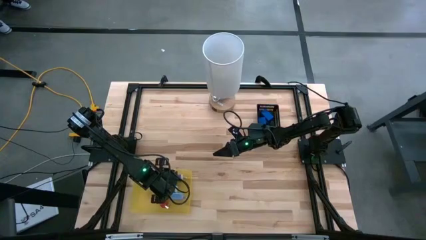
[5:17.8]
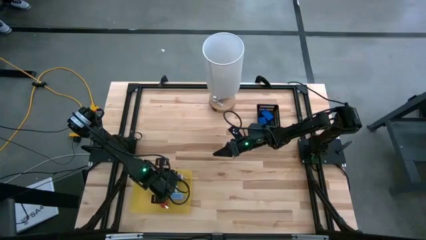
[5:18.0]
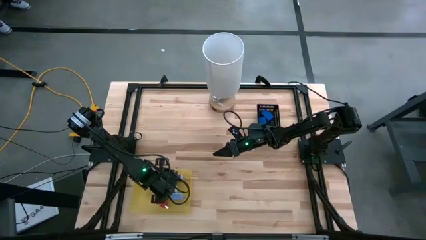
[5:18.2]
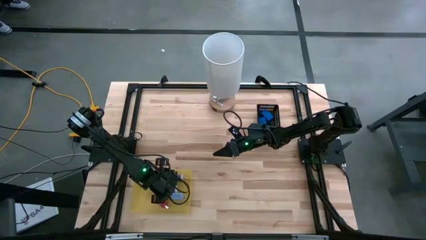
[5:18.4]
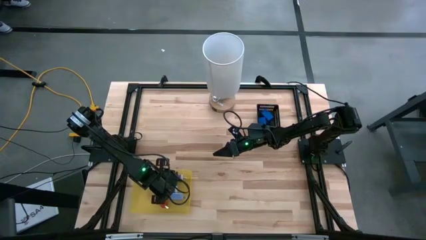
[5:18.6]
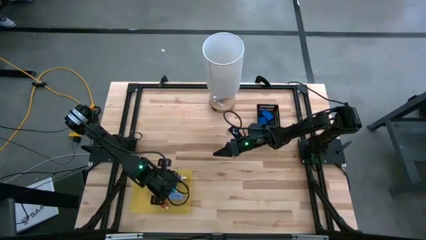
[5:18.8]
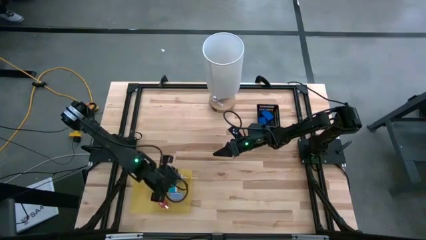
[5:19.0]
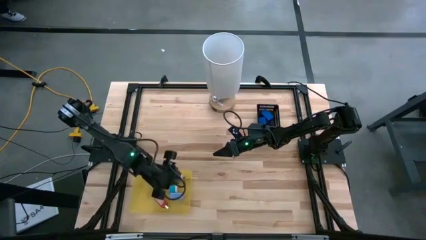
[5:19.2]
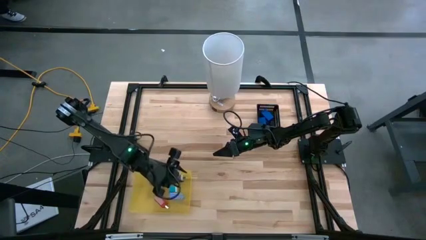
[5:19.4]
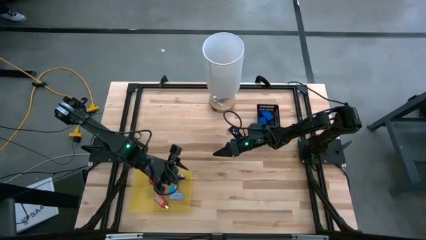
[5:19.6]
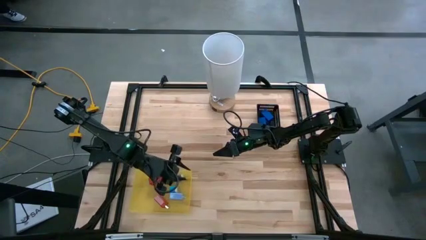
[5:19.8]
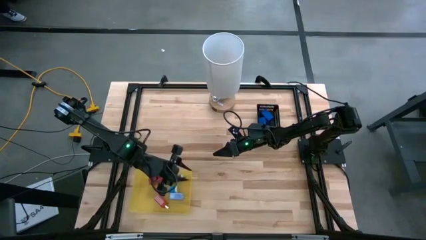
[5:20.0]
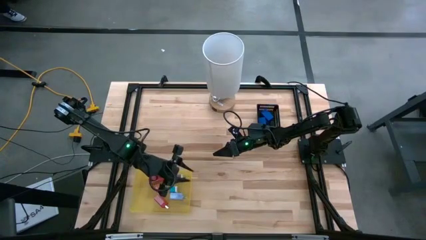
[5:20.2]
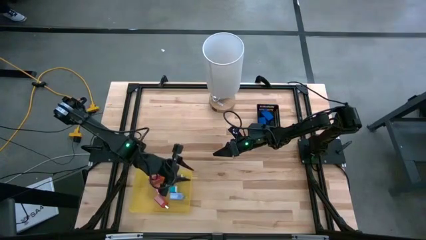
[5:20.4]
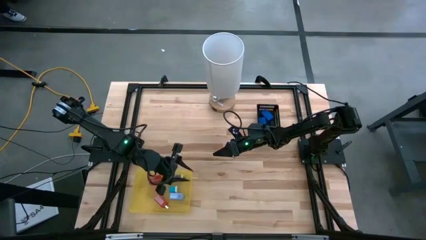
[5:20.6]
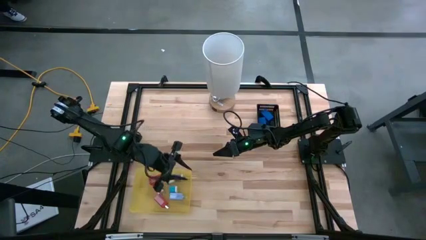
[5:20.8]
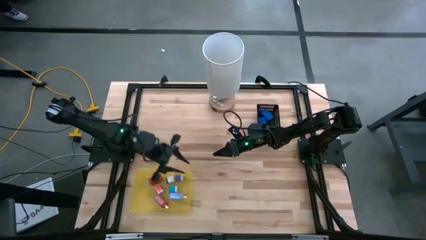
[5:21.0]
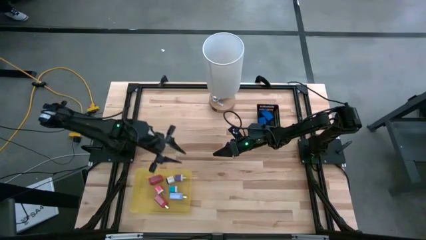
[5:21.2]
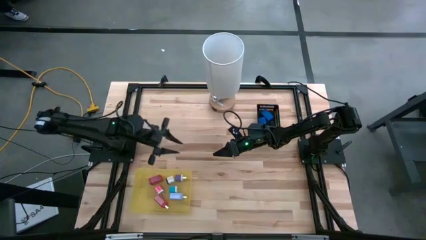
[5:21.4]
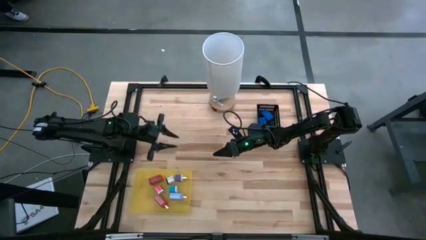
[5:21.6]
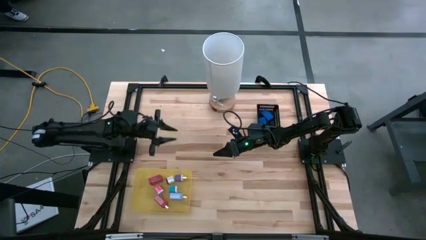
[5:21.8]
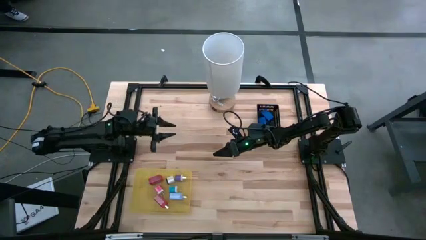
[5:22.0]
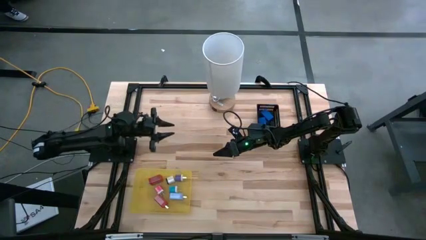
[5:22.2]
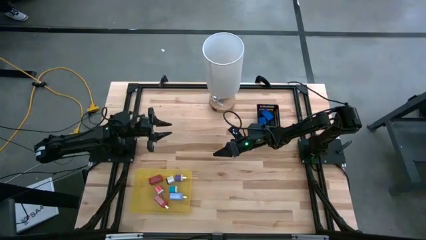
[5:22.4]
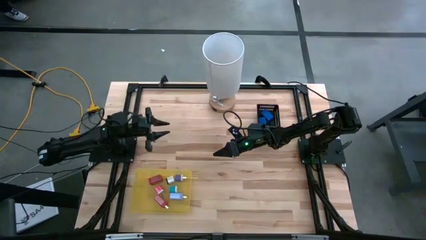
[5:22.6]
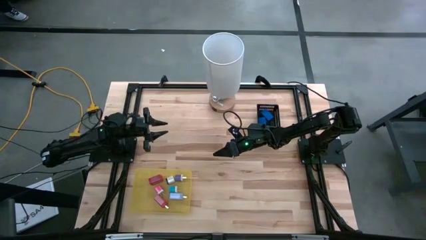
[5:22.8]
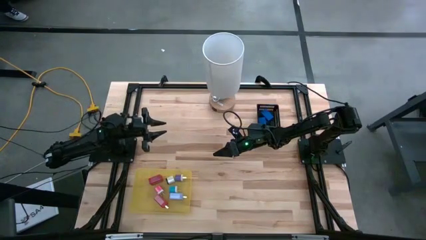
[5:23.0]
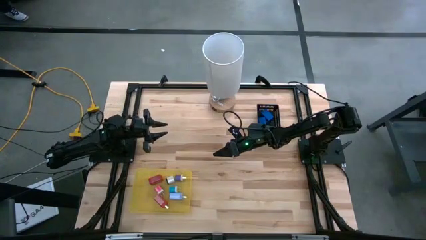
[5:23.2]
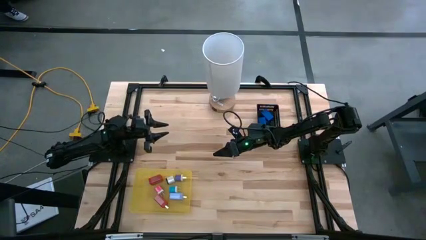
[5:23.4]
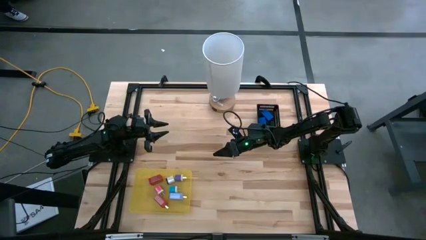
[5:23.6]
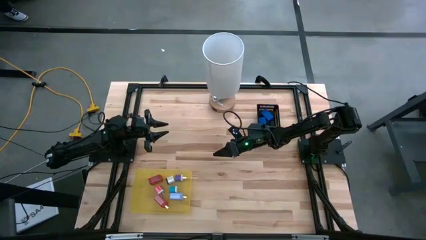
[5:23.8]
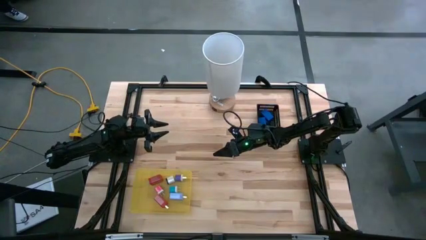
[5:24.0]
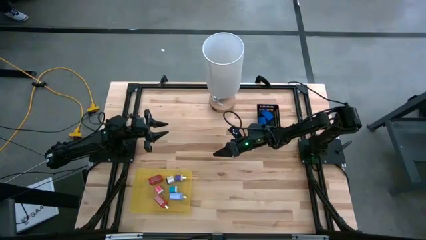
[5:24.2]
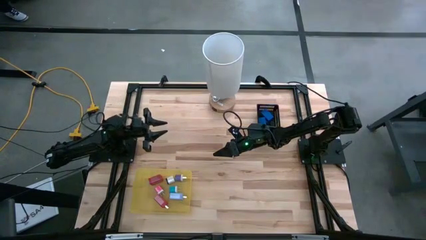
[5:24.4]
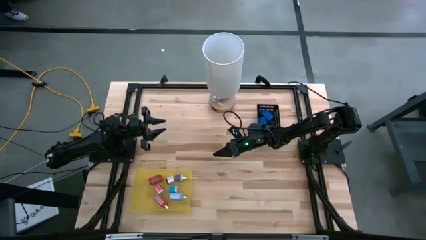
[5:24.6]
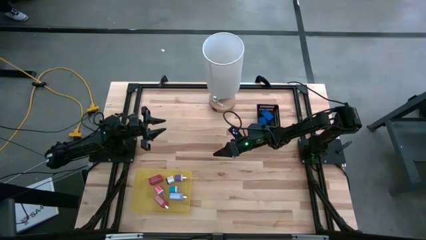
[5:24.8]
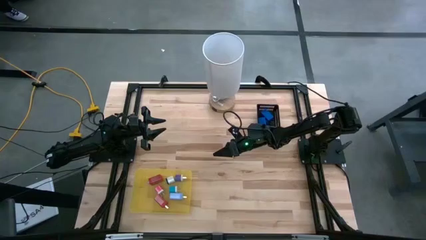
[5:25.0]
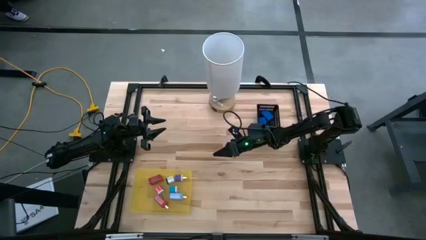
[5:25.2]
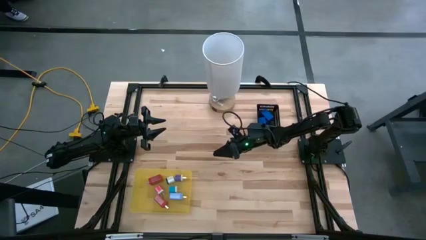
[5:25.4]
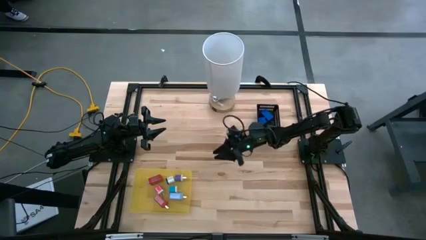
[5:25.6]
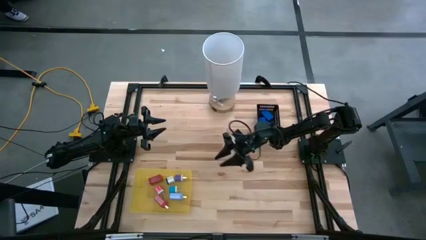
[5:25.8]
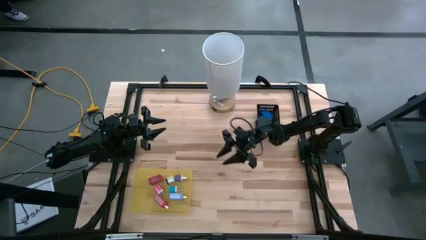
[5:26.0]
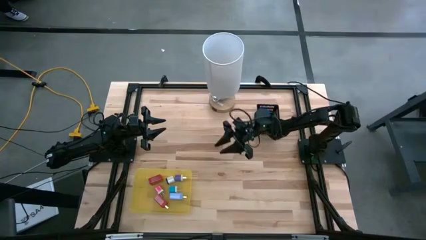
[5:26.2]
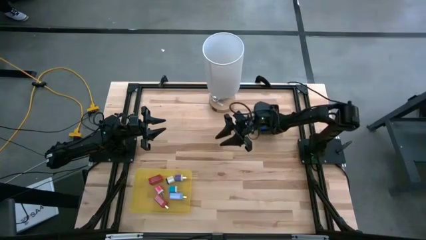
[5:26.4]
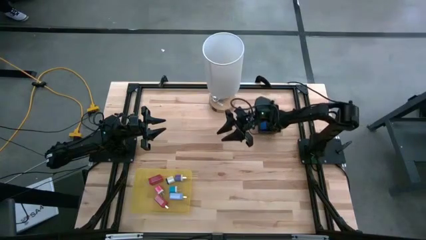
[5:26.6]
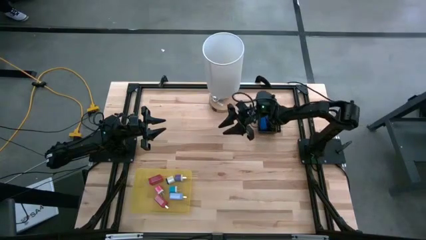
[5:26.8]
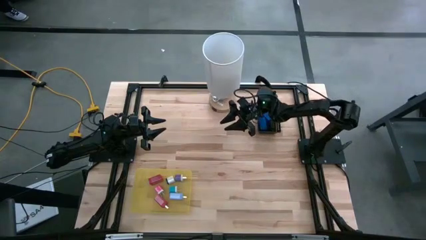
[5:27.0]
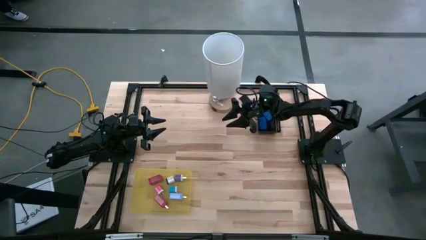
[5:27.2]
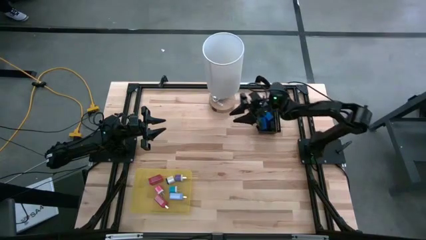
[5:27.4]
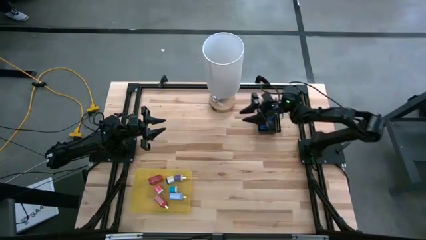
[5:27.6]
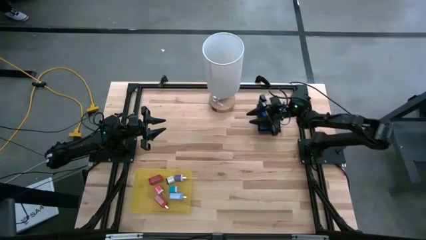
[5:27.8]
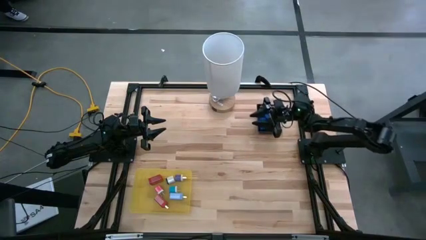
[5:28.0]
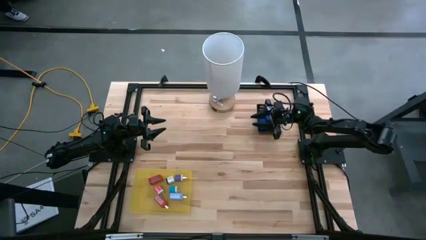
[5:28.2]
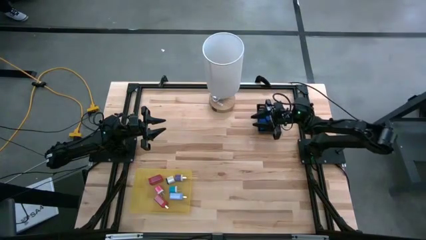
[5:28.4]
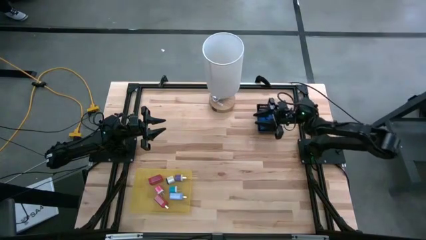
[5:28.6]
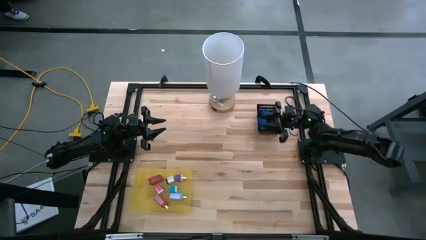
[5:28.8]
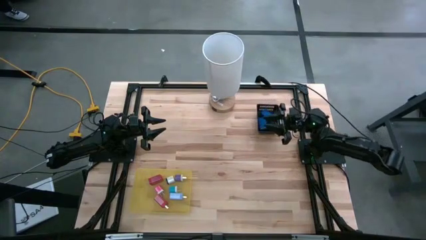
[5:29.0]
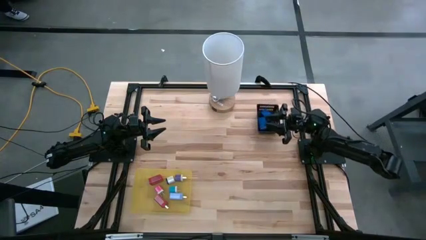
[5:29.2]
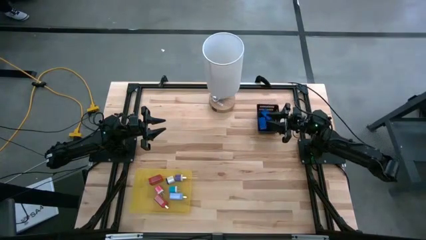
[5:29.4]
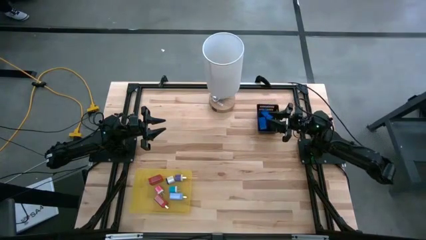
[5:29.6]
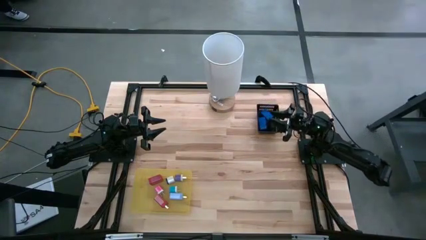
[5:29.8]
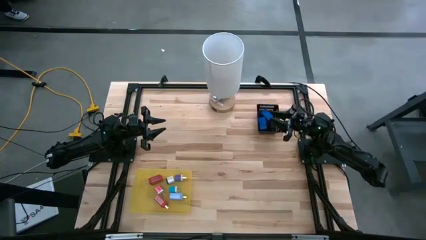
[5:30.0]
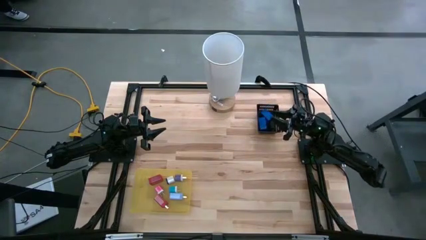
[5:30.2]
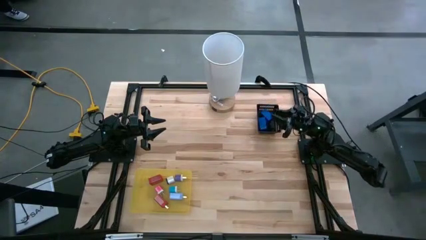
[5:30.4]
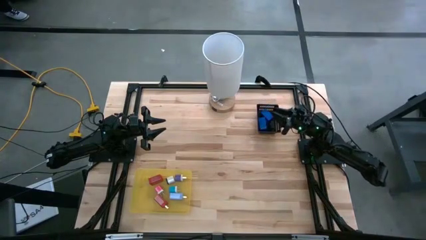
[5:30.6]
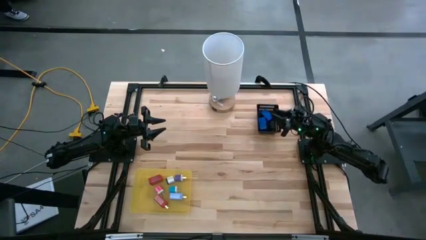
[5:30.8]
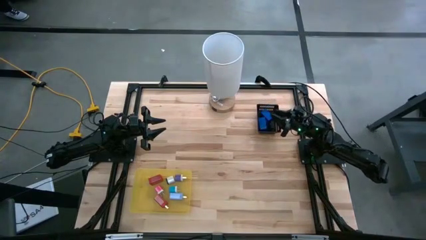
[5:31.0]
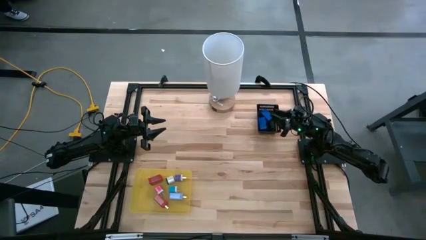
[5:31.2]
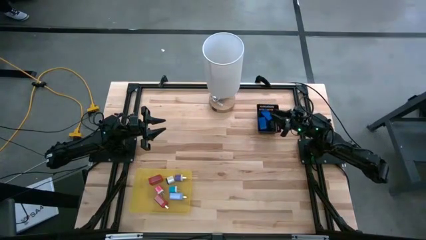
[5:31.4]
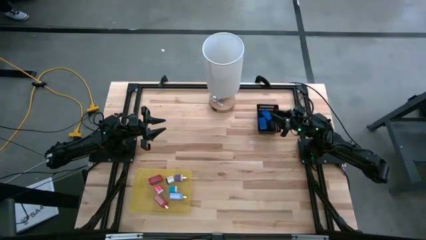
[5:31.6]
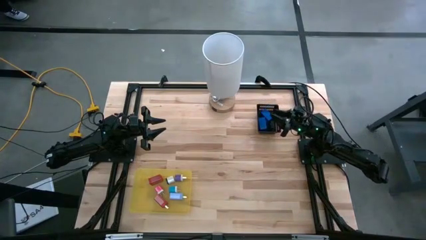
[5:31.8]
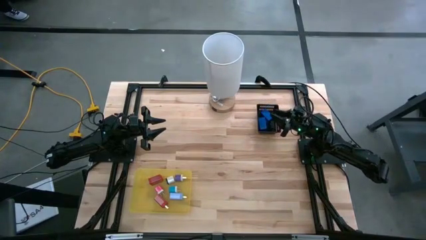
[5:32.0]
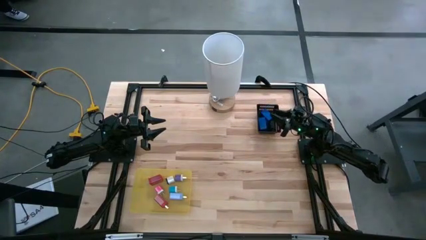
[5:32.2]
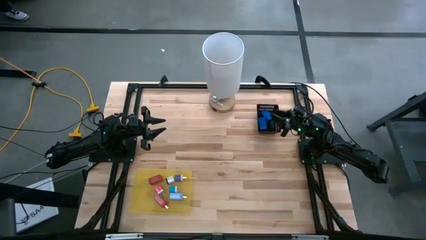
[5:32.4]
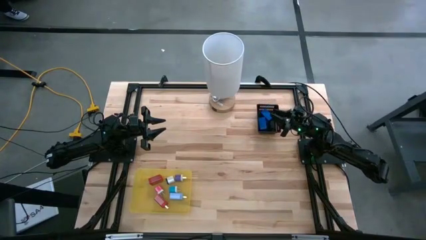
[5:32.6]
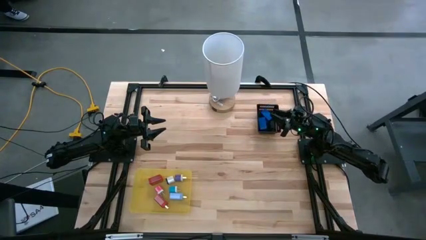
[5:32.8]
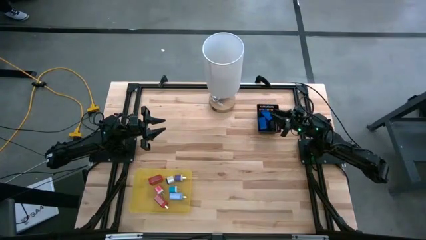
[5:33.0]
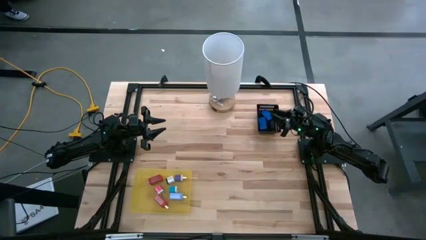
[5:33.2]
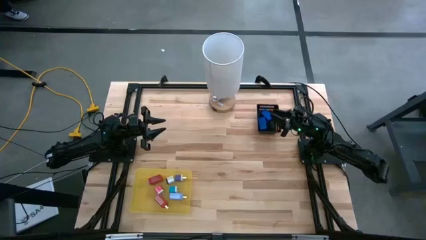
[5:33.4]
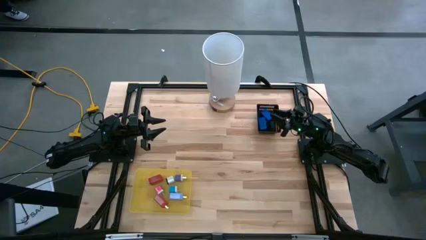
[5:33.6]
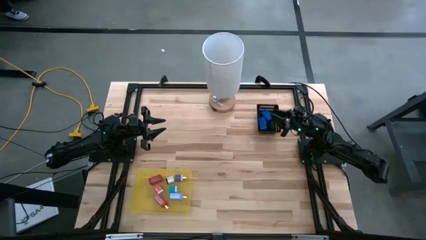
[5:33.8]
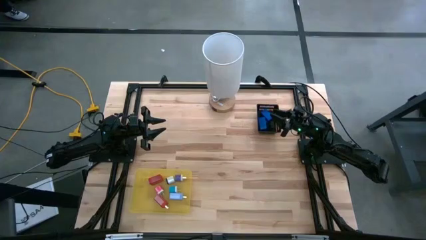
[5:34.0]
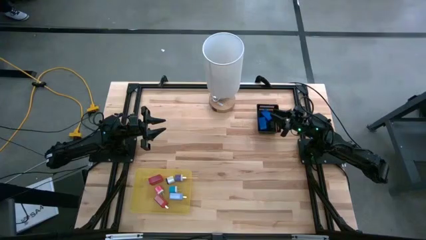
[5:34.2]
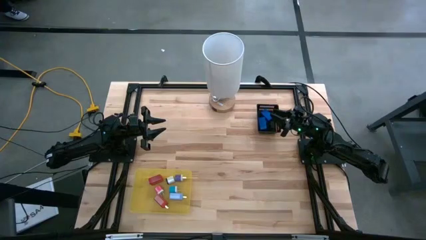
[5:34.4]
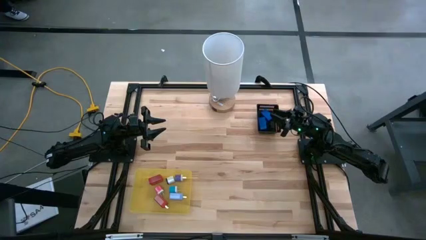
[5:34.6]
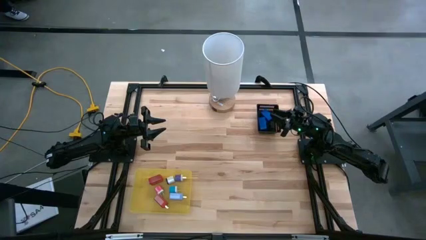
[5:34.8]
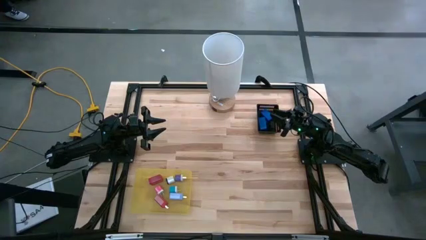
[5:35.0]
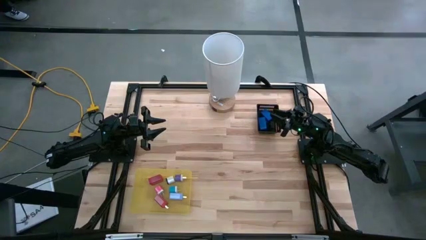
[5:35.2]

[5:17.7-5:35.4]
Task: Pick & Place Office items
Return to Home Position
